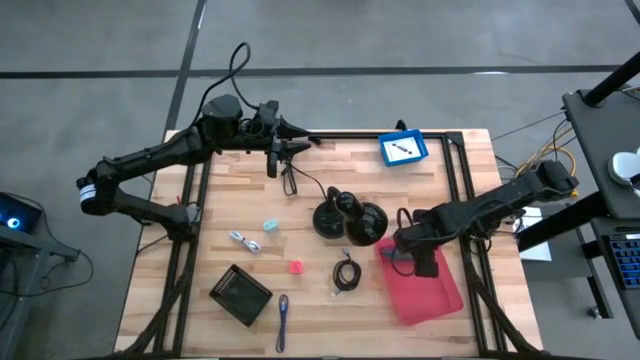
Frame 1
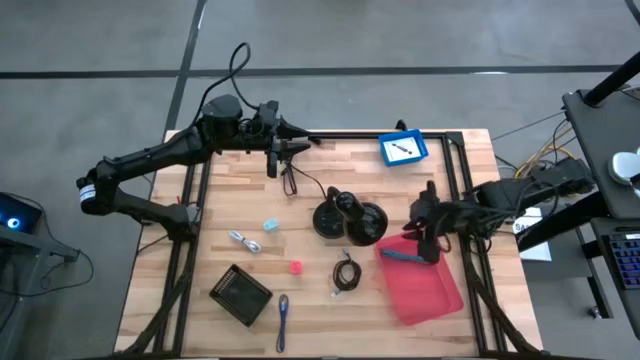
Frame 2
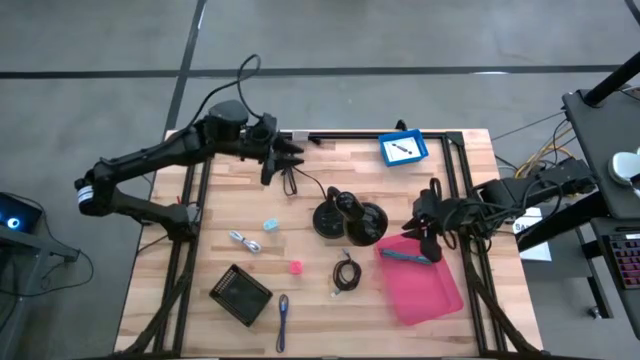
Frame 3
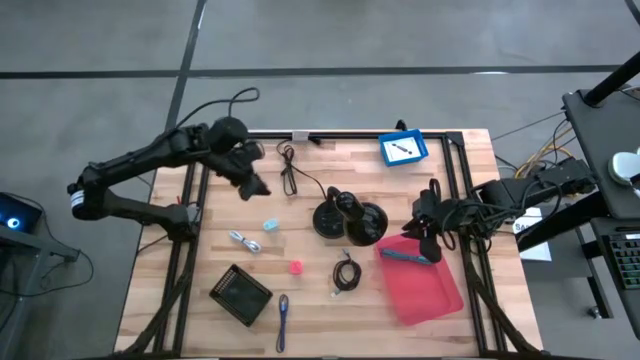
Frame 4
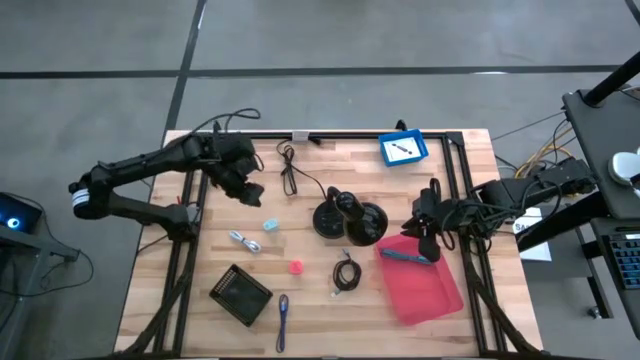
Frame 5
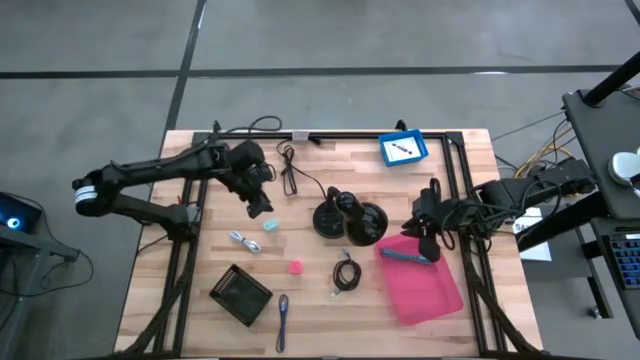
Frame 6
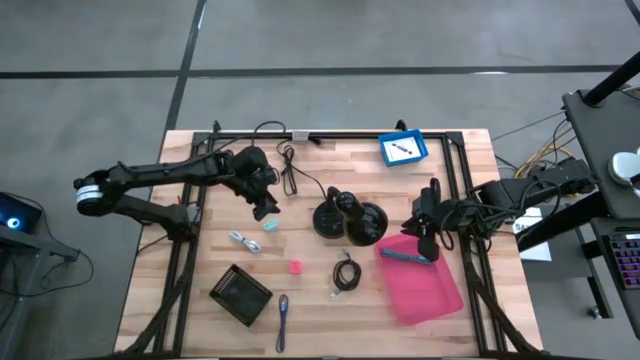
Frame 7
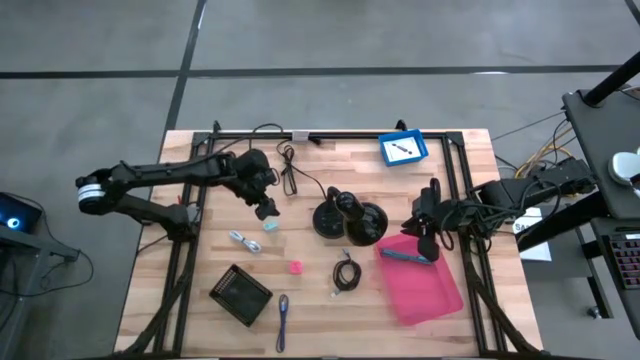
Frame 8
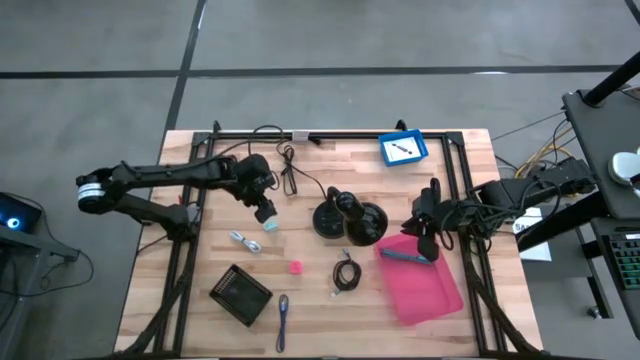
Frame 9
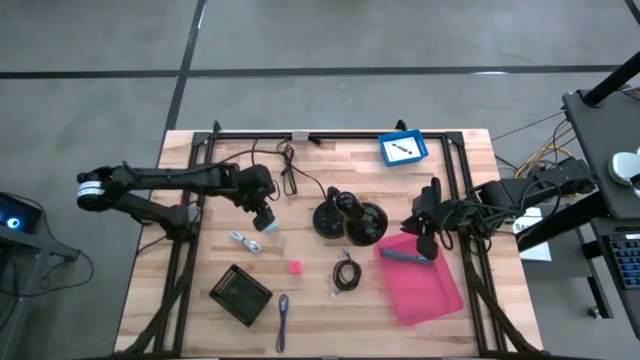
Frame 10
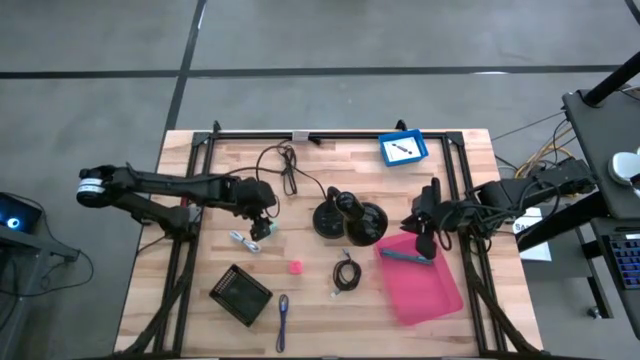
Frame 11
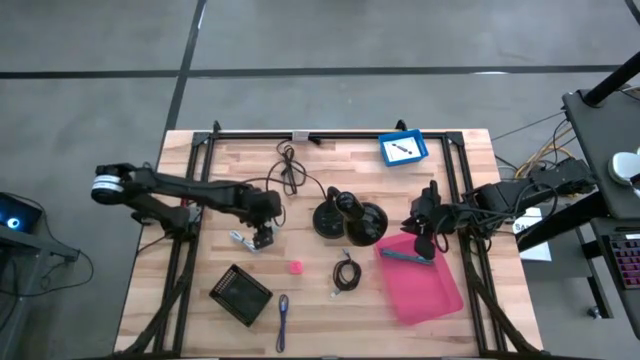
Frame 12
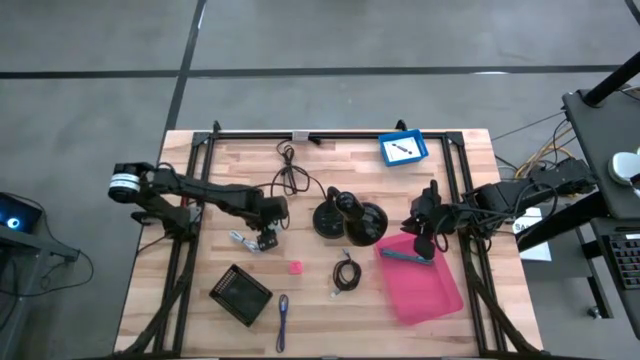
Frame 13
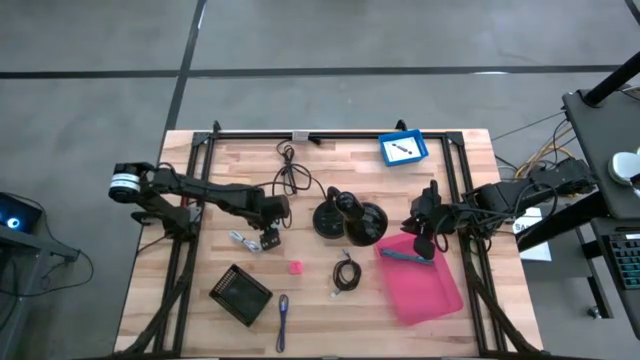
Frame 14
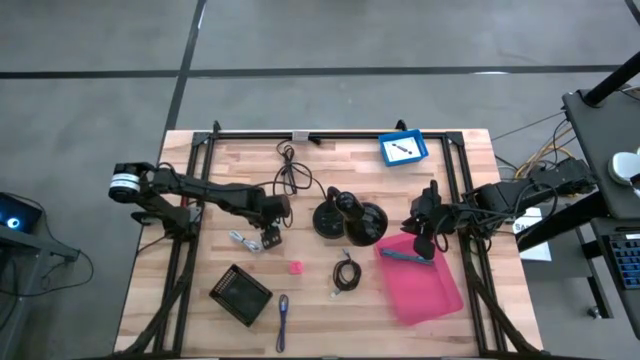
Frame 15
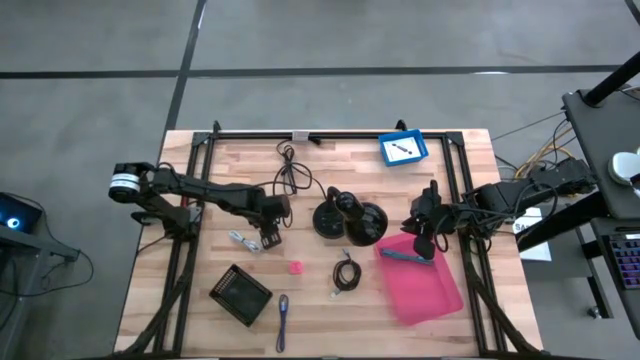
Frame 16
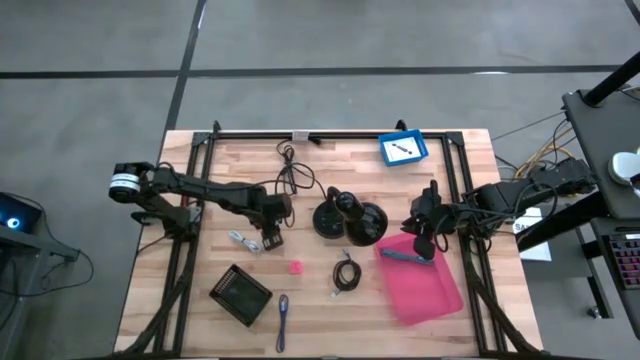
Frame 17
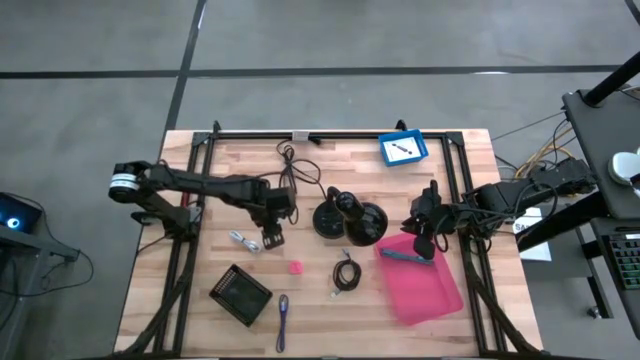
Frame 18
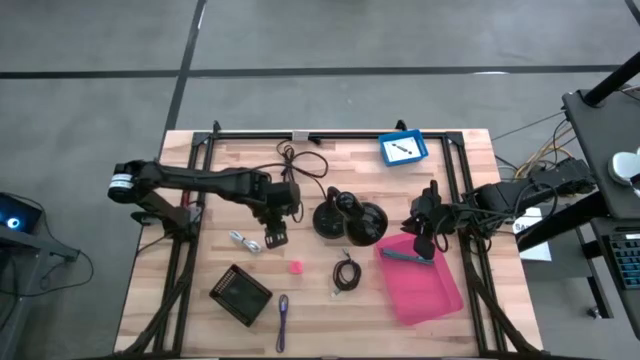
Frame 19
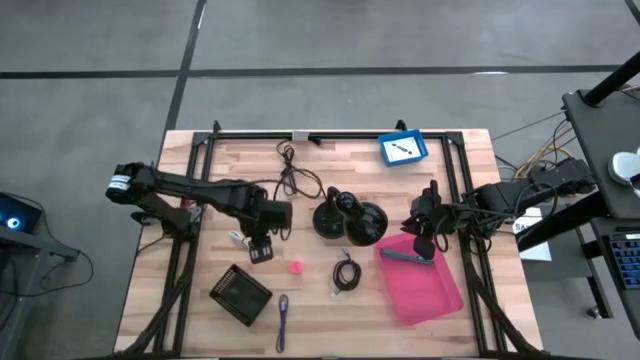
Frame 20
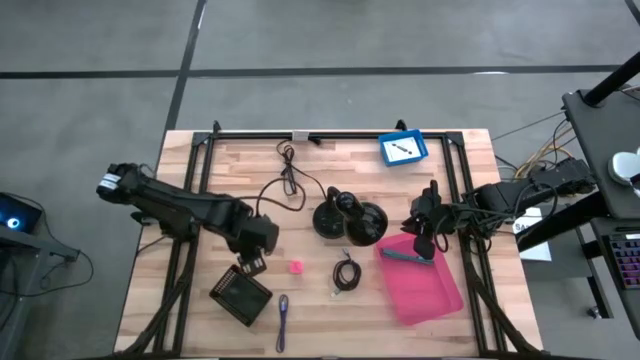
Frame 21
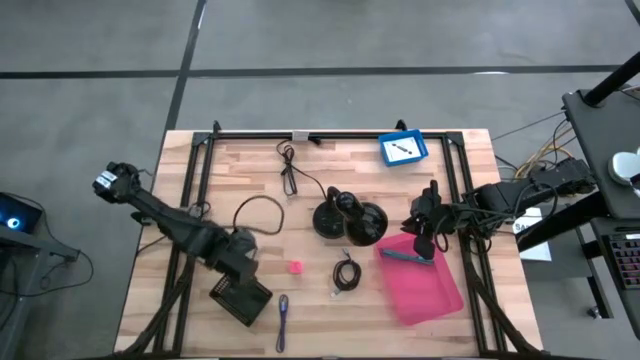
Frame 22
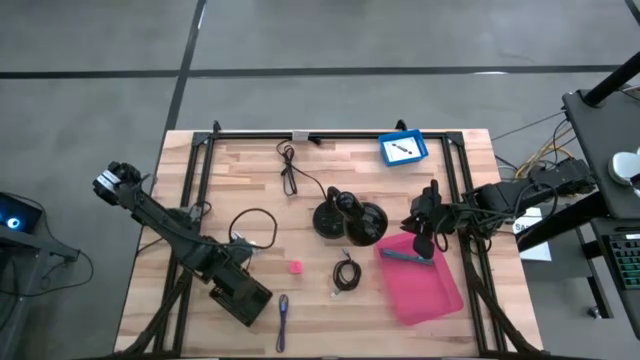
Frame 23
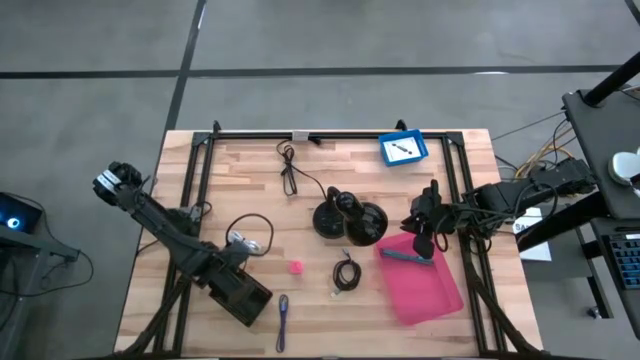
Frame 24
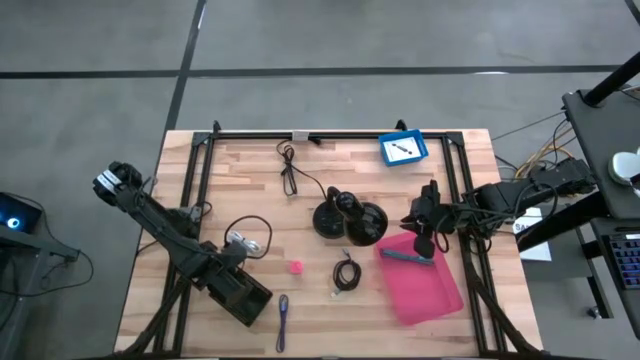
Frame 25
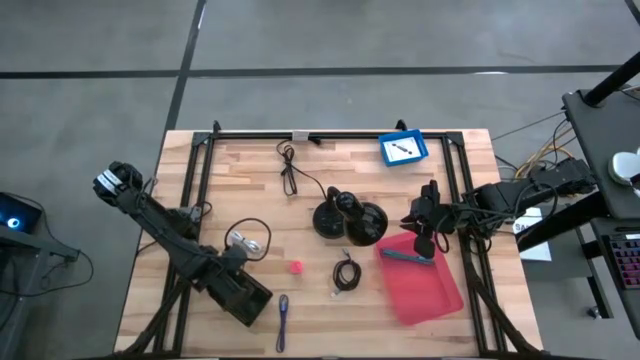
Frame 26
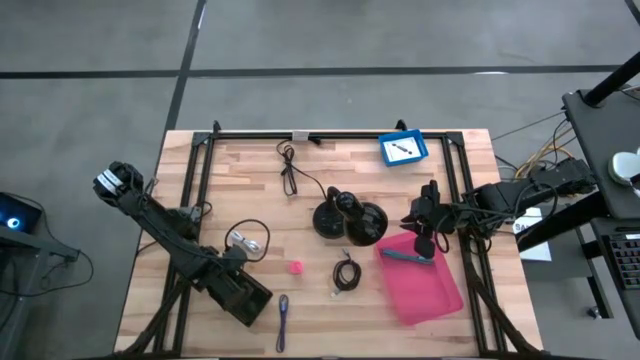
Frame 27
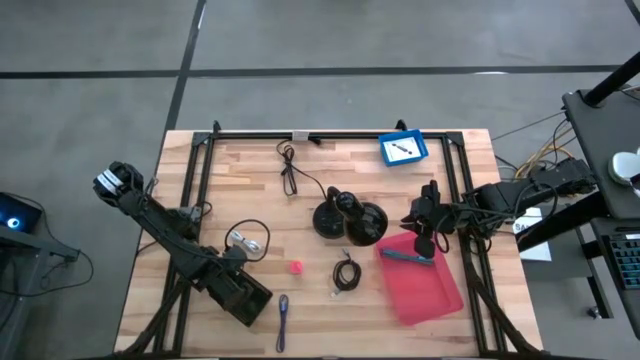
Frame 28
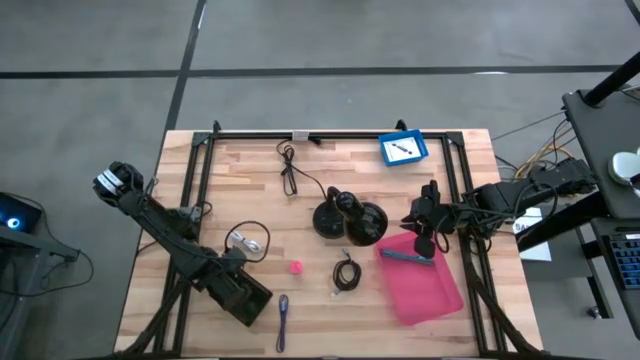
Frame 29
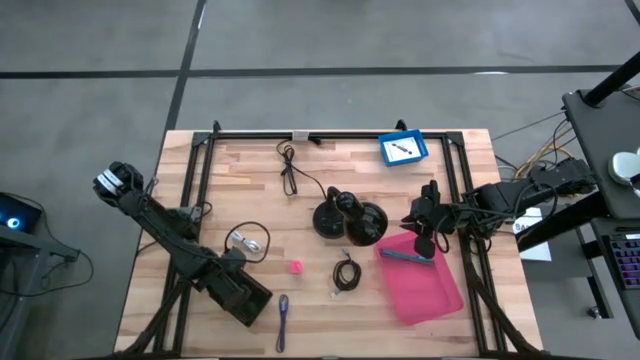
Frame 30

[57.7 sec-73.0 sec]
Task: Pick and place items into bin
Put the white charger adapter into the black bin

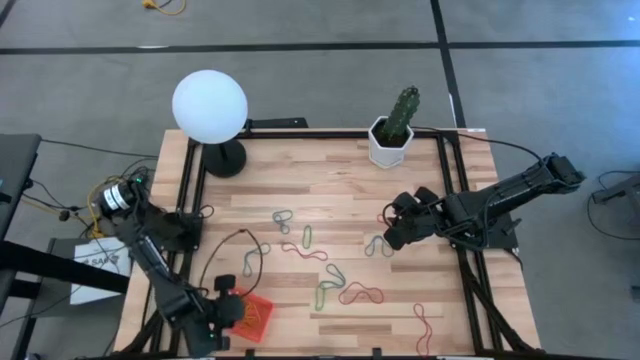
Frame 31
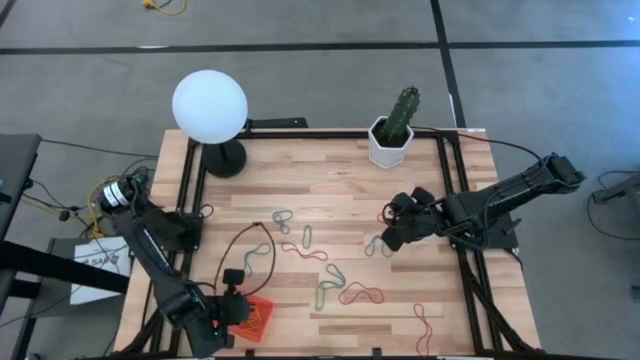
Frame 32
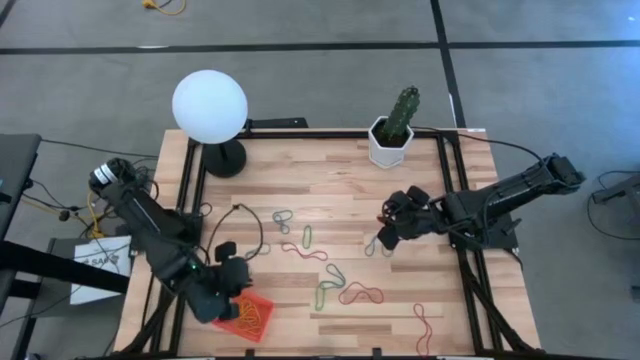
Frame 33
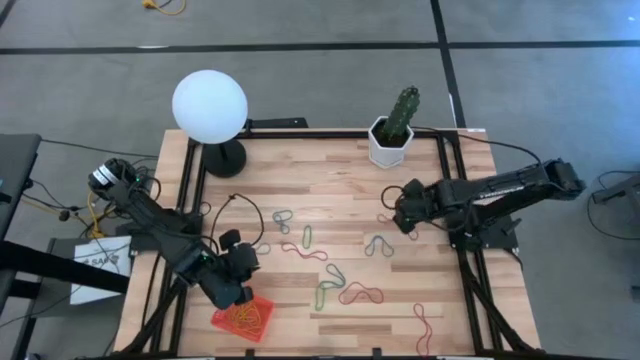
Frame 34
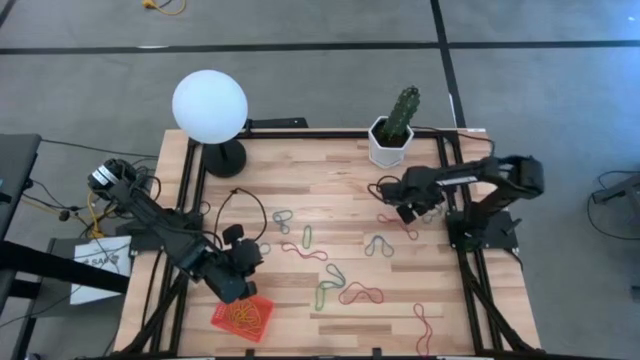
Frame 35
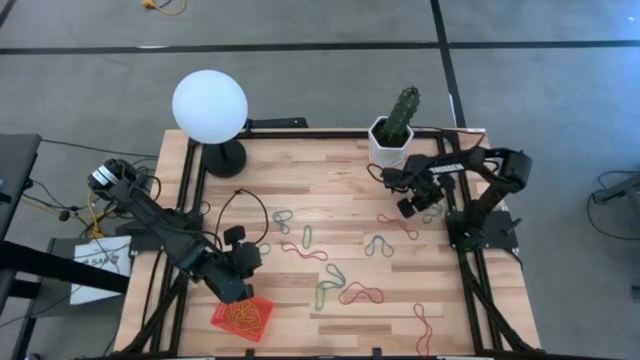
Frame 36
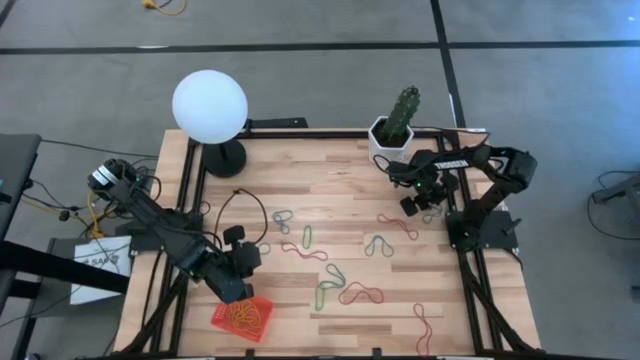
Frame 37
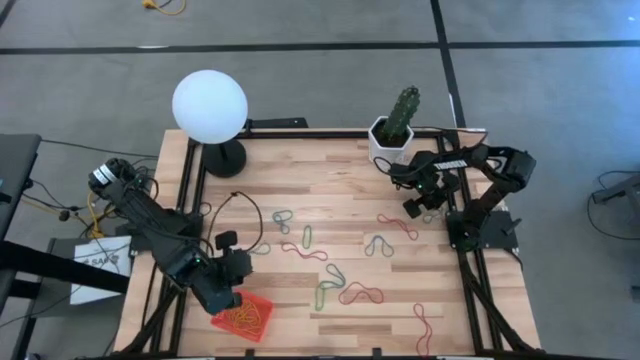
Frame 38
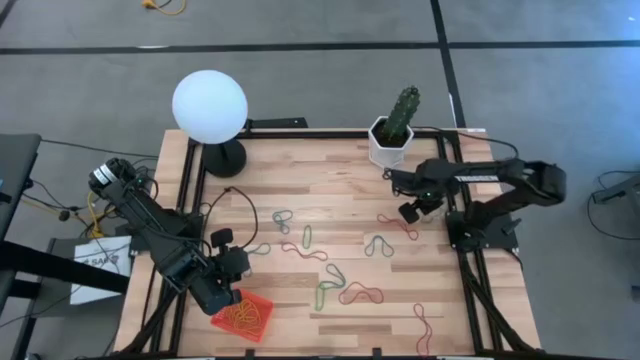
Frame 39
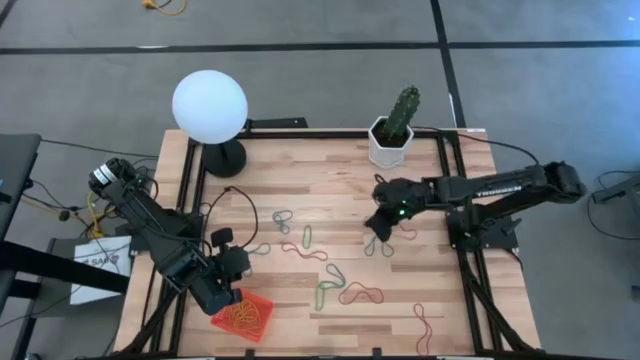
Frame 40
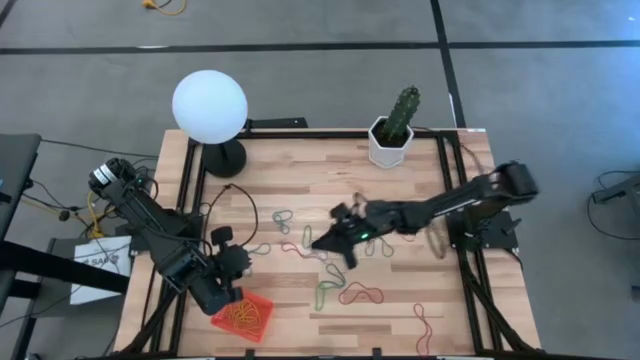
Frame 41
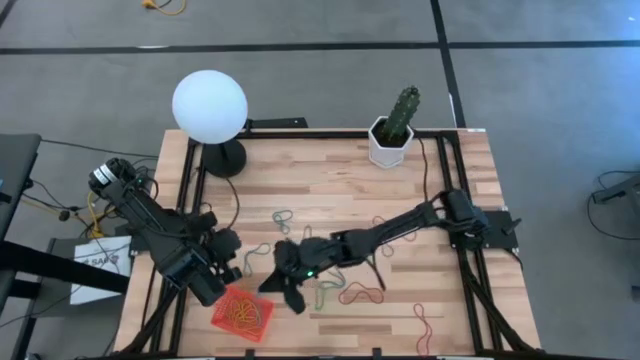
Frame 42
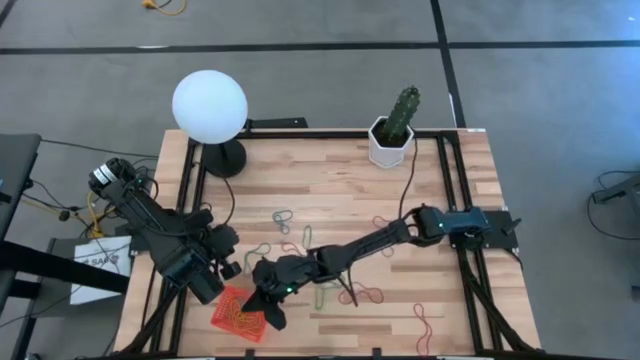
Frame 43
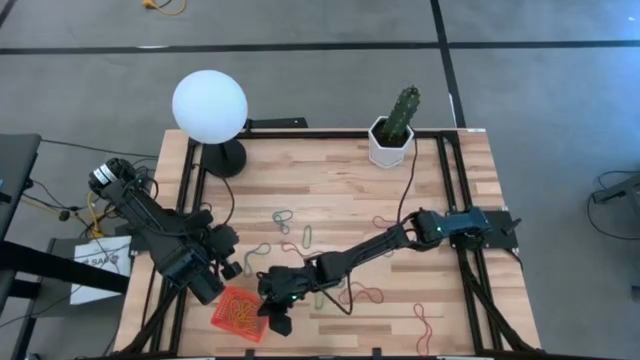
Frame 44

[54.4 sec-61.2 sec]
Task: Pick and place rubber bands into bin
Put the blue rubber band into the basket
